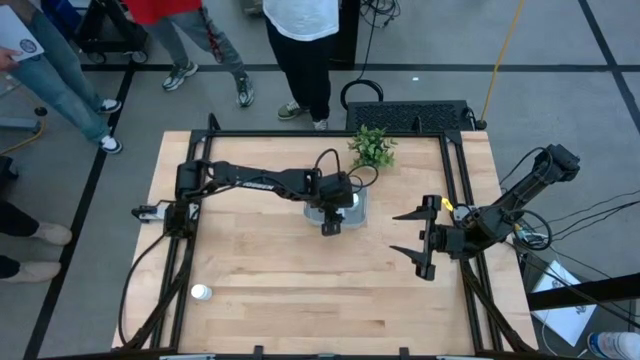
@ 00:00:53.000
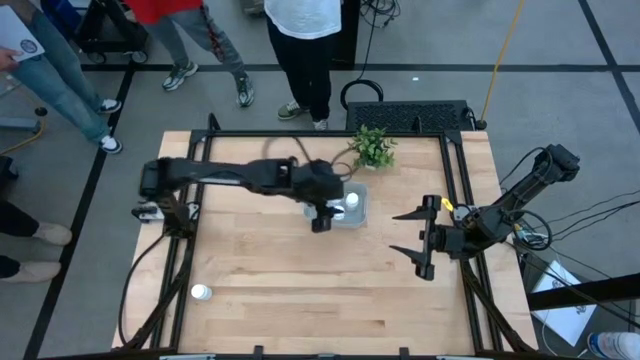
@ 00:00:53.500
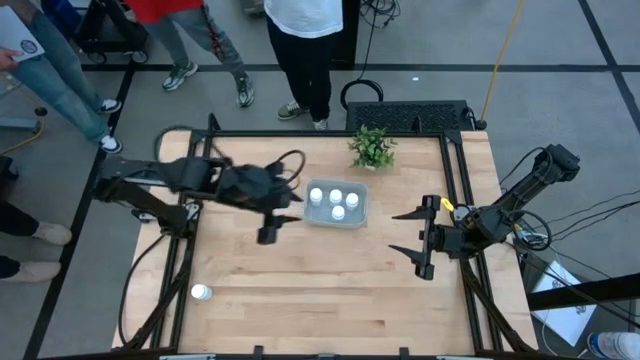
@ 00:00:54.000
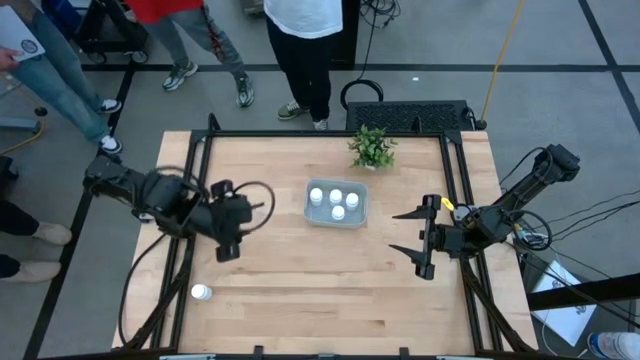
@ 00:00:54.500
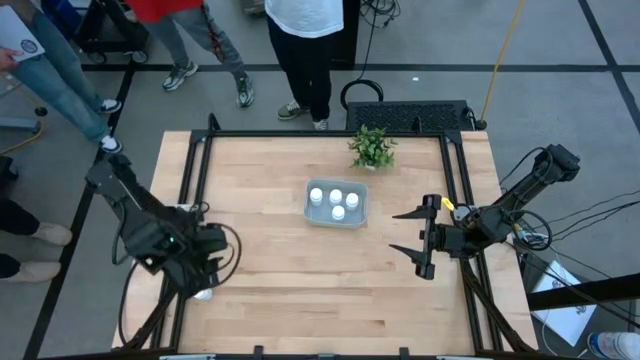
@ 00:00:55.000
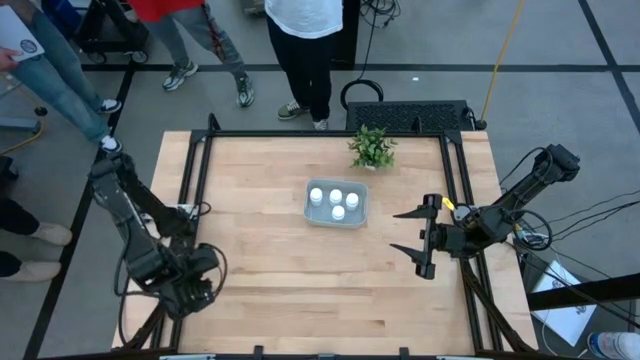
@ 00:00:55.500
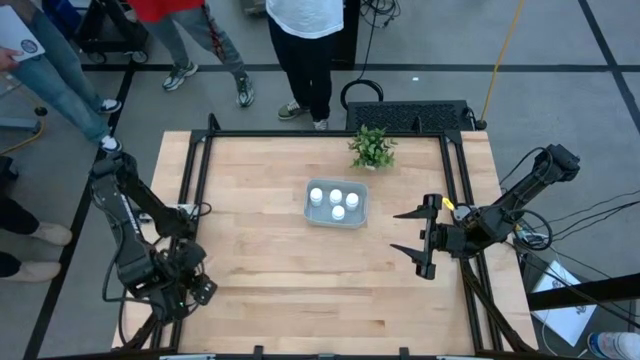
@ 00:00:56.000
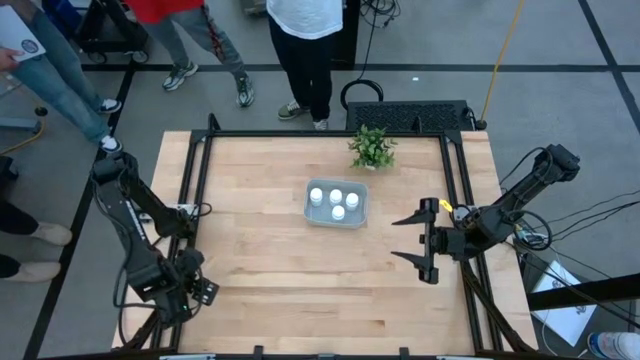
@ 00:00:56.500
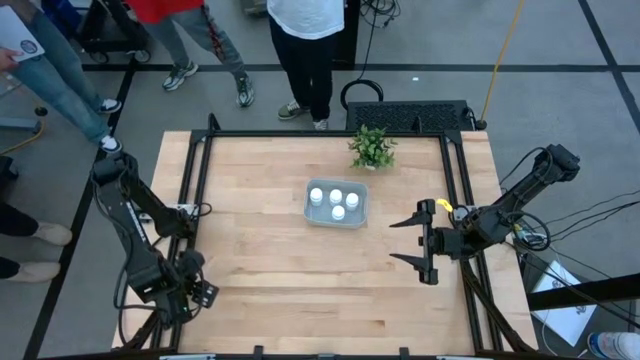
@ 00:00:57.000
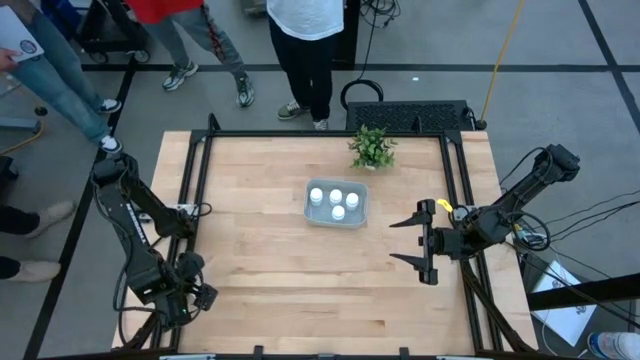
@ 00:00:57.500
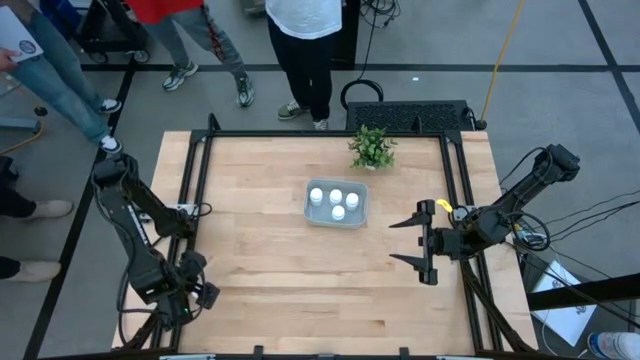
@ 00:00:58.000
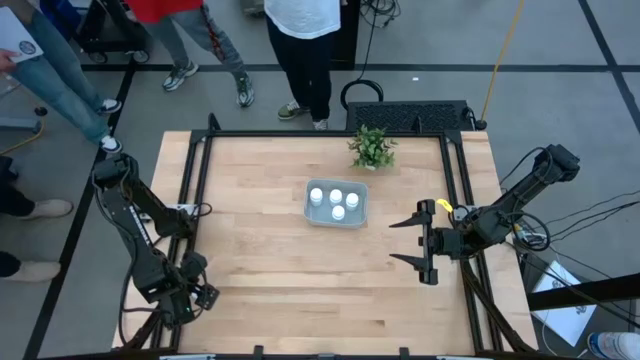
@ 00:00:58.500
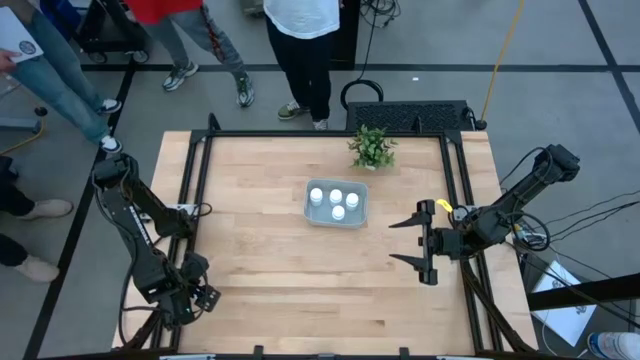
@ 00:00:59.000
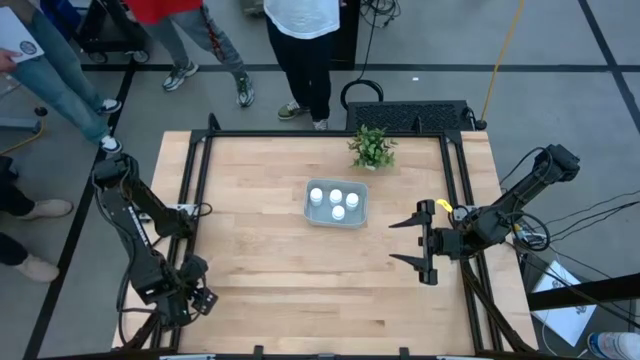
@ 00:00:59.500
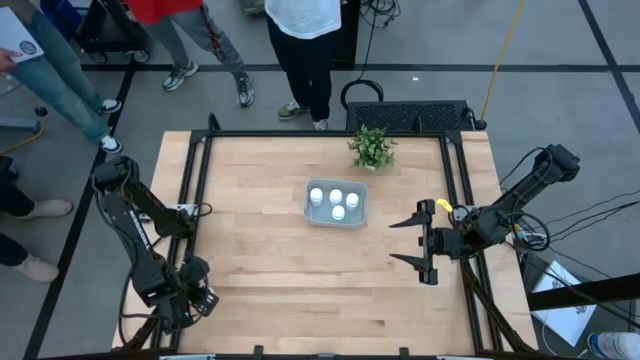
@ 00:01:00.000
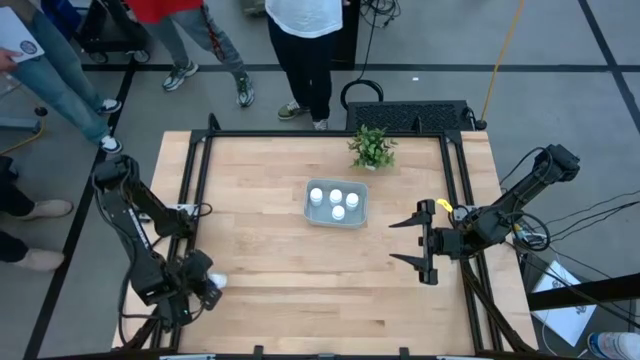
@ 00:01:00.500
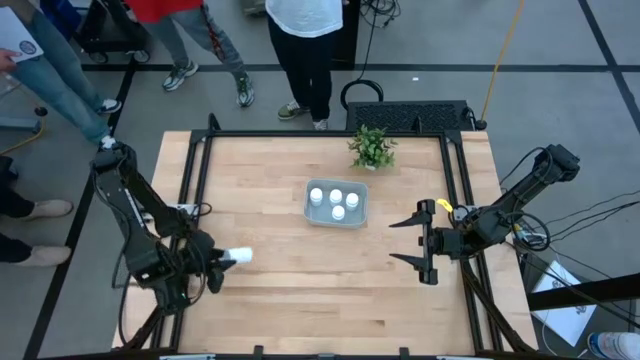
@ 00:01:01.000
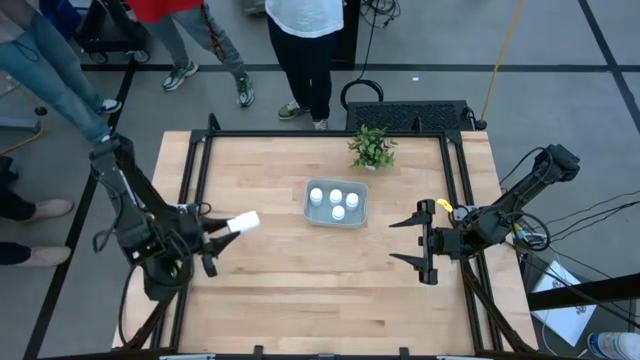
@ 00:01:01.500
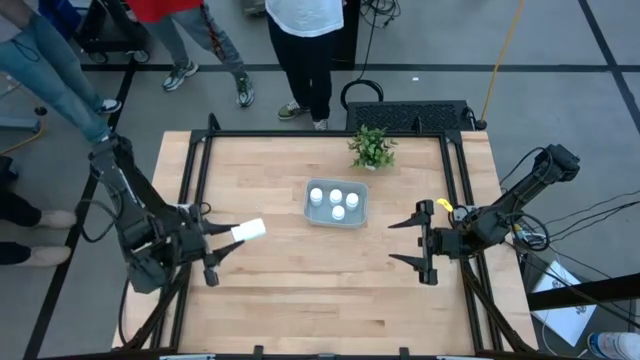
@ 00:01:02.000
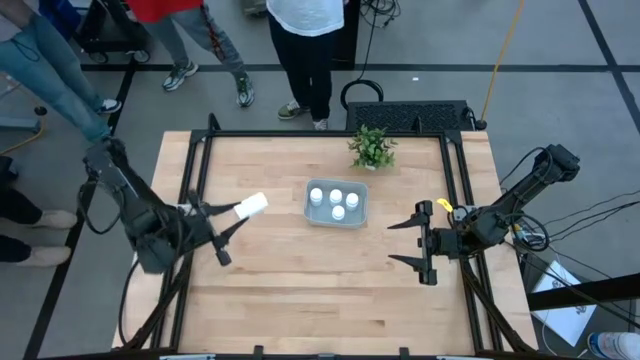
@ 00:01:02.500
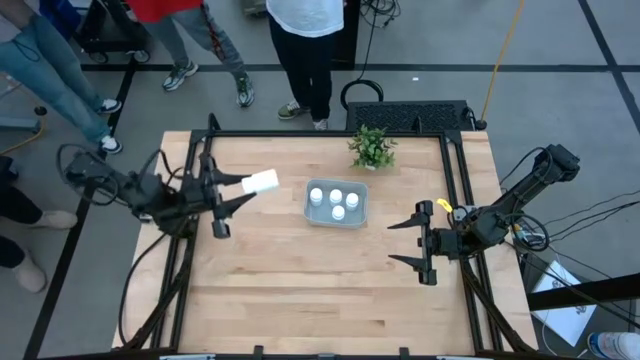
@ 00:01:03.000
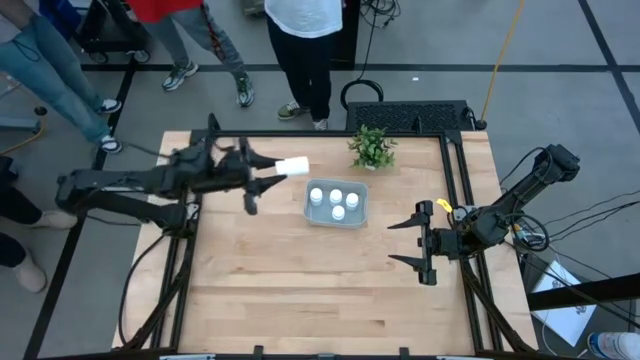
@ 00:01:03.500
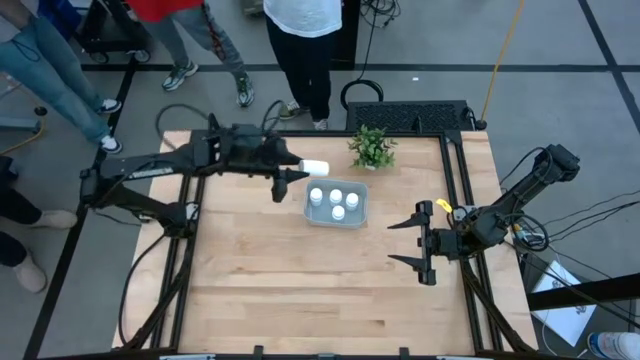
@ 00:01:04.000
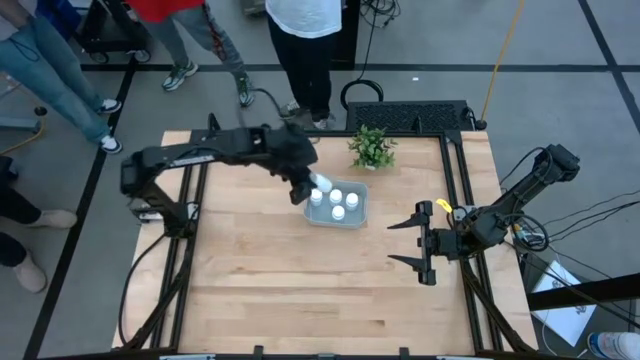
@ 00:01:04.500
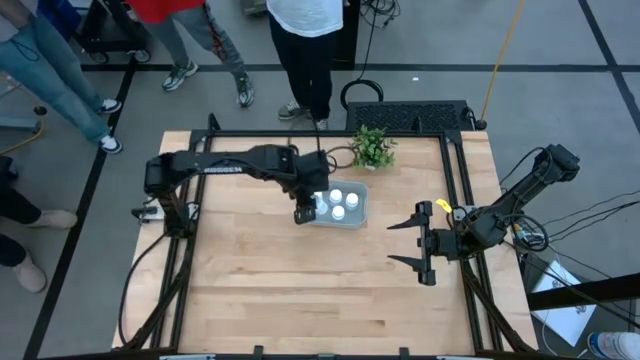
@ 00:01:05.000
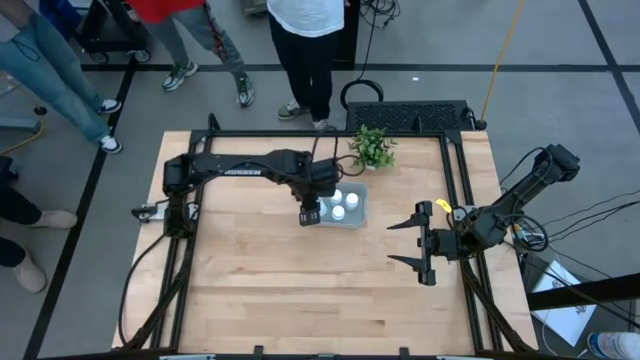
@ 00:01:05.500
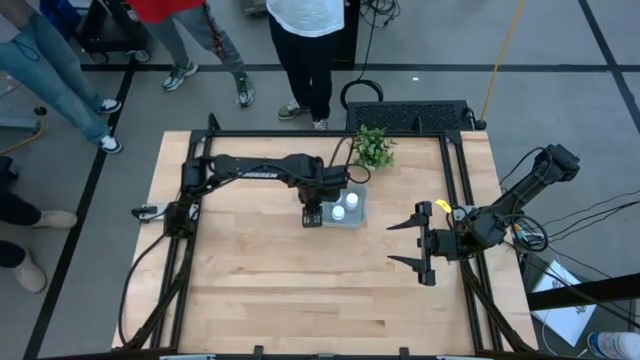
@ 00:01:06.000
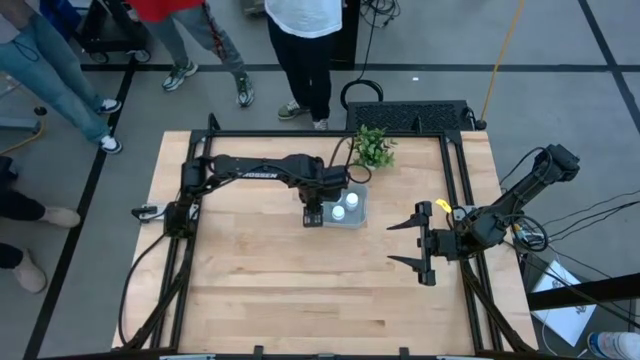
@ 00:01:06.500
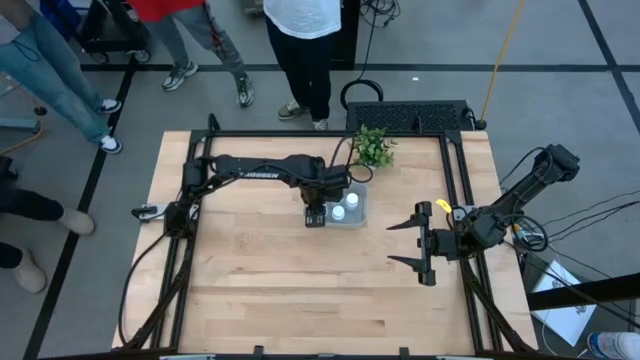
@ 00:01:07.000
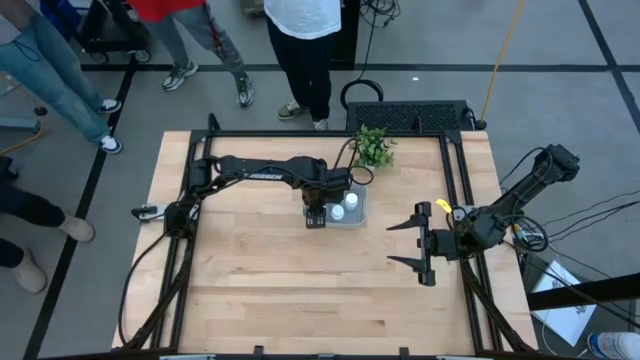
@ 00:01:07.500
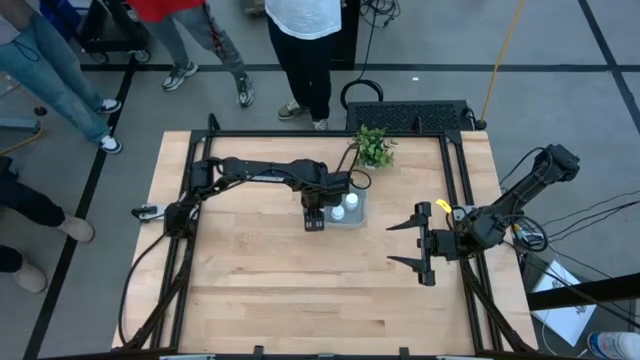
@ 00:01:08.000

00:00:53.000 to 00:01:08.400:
Task: Pick and place pill bottles into a basket
Put the white medicine bottle into the bin

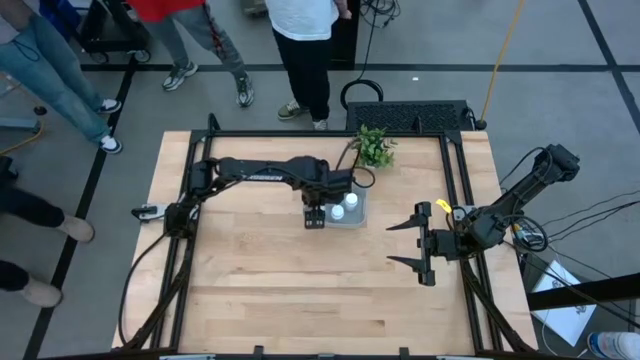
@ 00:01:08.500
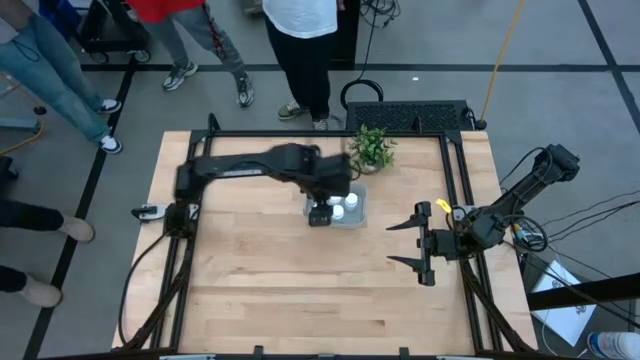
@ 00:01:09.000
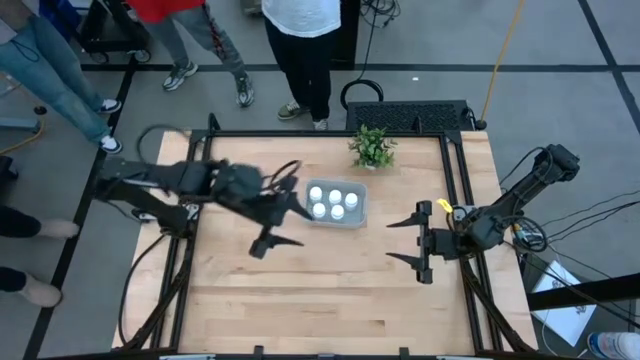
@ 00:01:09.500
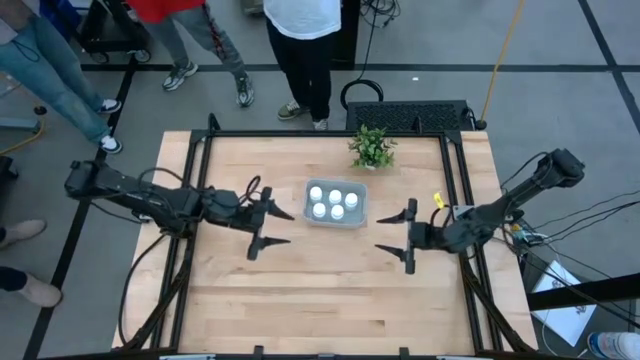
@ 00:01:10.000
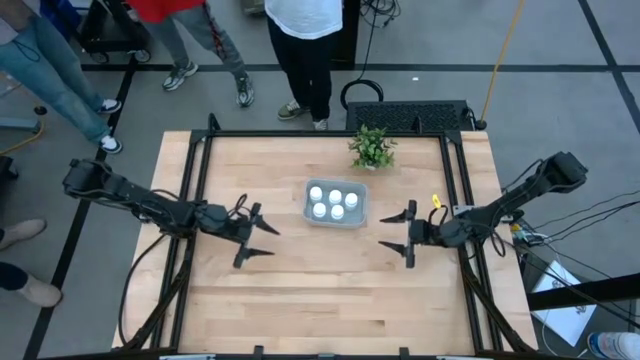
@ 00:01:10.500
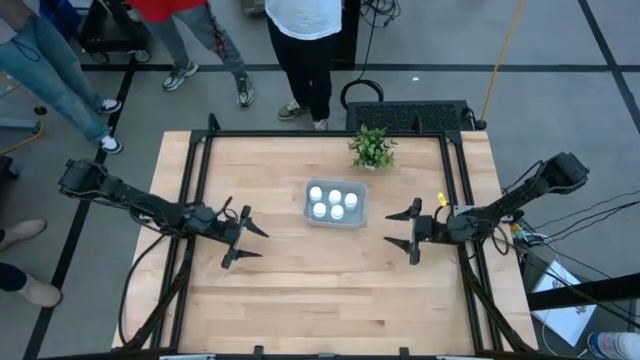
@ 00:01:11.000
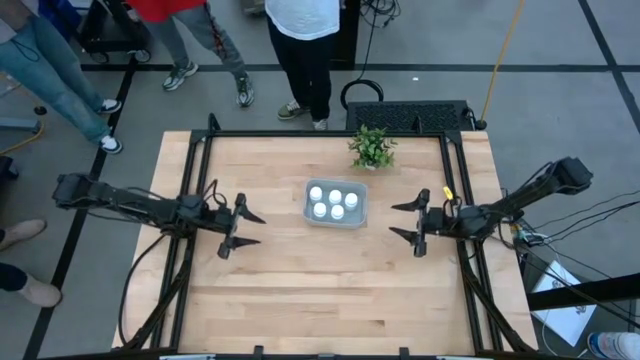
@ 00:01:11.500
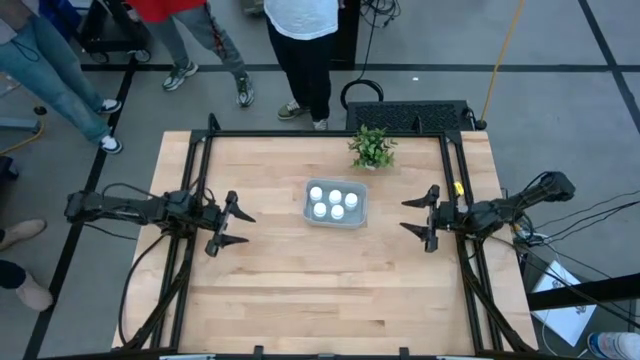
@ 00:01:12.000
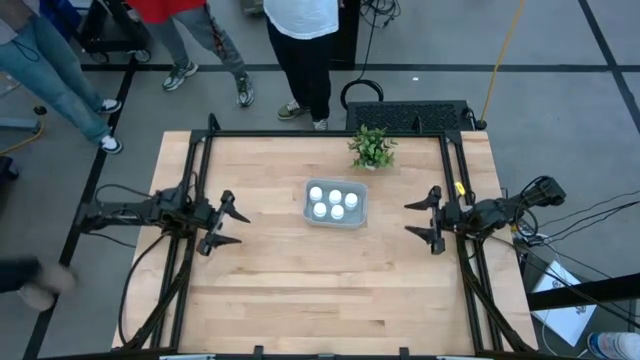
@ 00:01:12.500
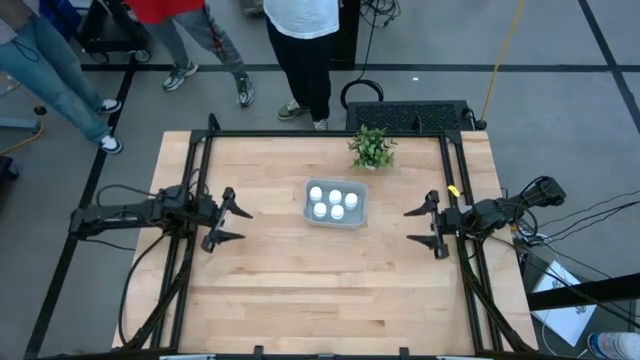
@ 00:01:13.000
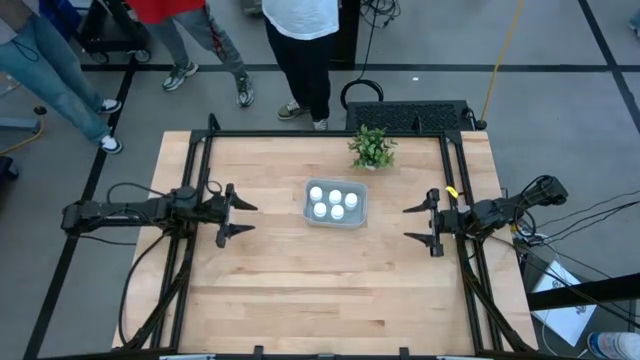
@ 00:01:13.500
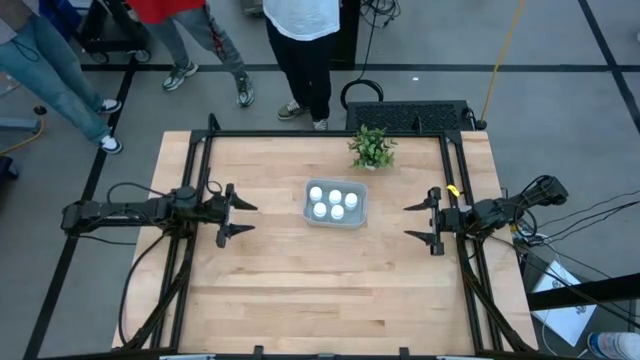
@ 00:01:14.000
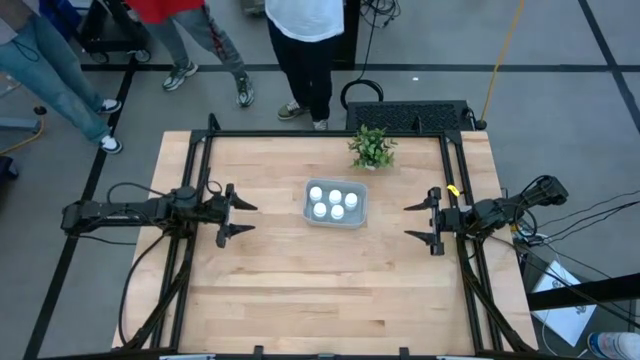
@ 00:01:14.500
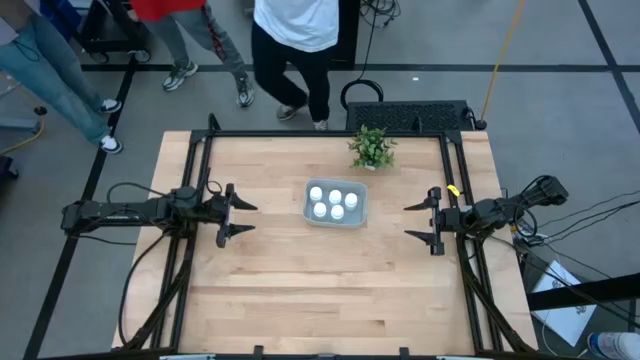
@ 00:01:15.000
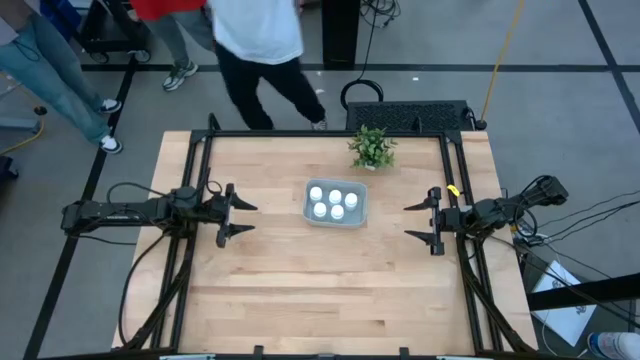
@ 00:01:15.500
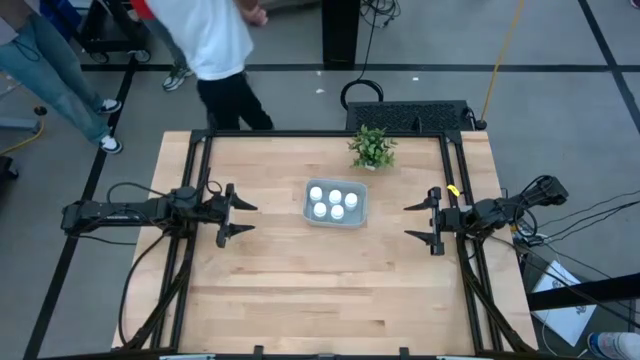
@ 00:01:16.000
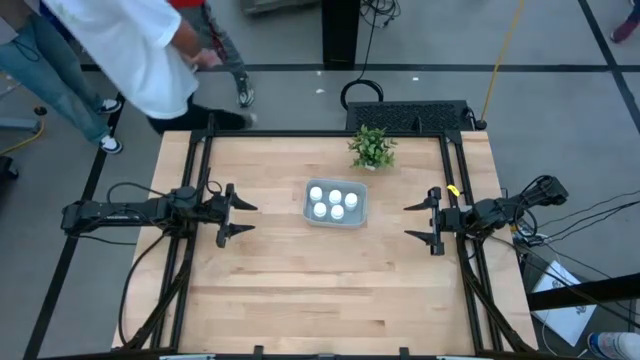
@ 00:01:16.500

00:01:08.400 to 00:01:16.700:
Return to Home Position
